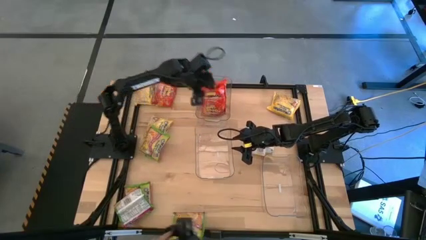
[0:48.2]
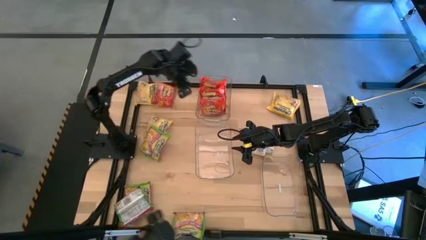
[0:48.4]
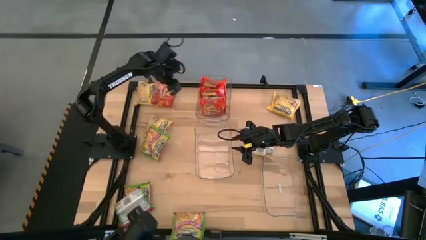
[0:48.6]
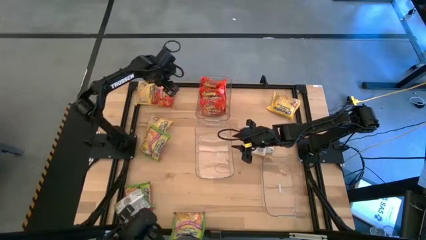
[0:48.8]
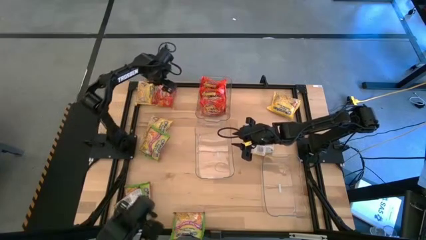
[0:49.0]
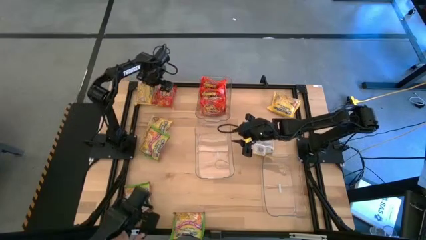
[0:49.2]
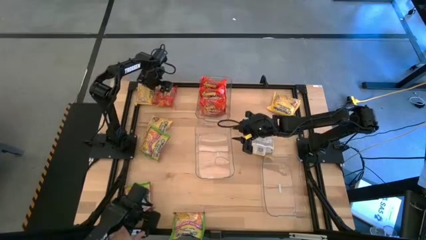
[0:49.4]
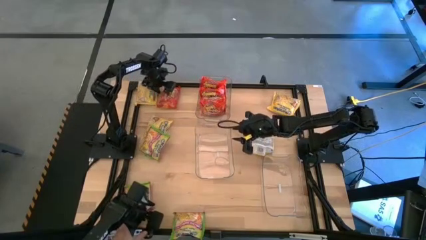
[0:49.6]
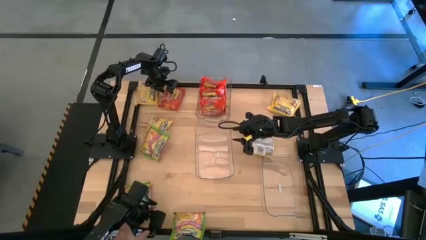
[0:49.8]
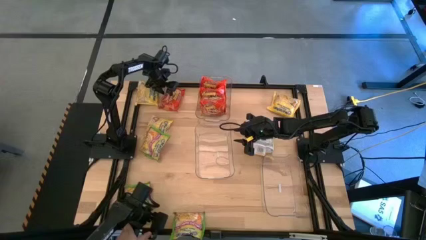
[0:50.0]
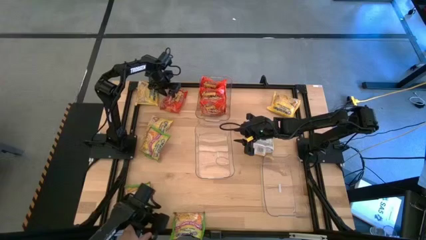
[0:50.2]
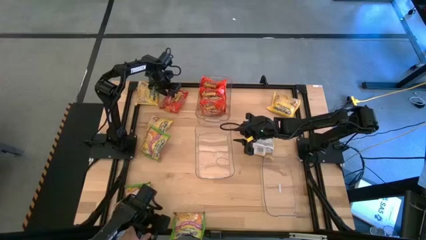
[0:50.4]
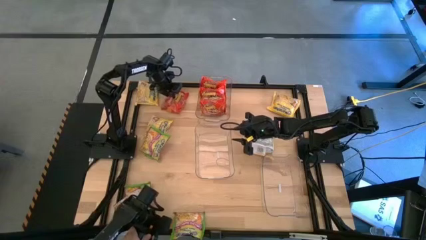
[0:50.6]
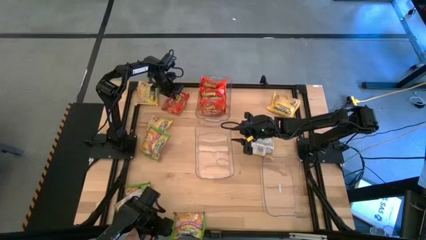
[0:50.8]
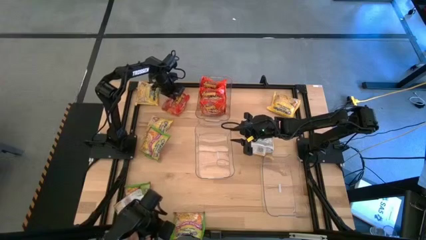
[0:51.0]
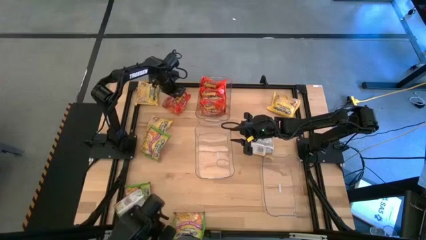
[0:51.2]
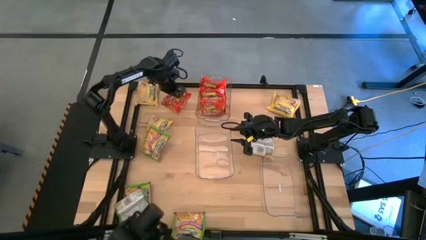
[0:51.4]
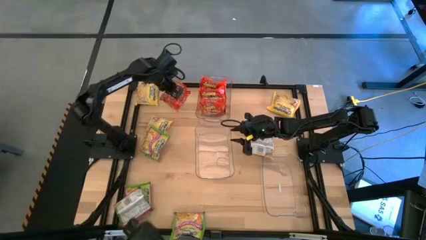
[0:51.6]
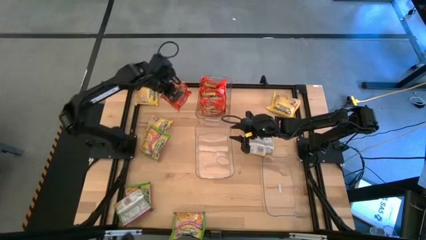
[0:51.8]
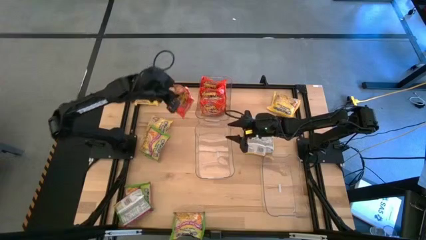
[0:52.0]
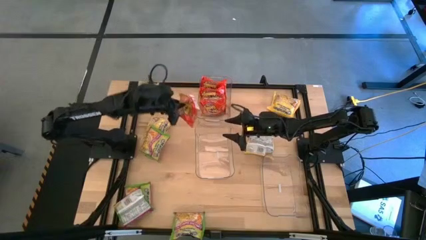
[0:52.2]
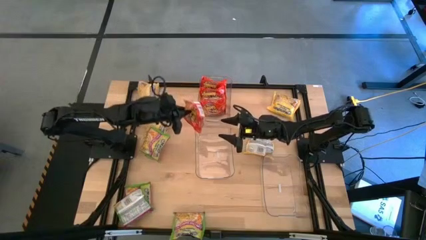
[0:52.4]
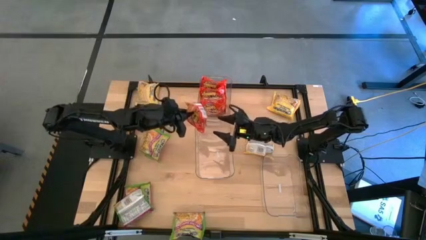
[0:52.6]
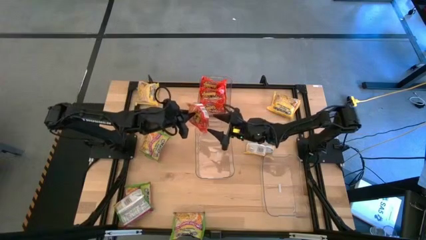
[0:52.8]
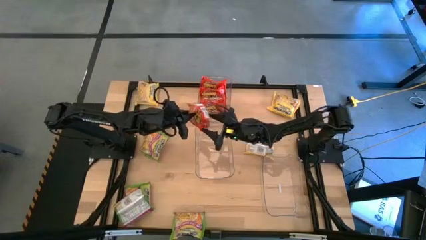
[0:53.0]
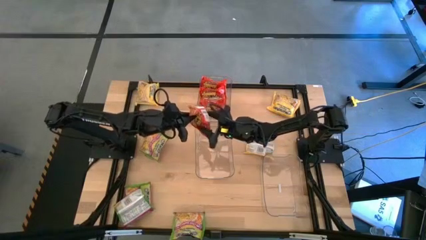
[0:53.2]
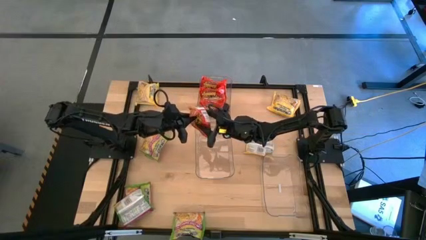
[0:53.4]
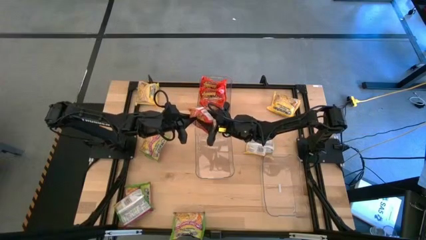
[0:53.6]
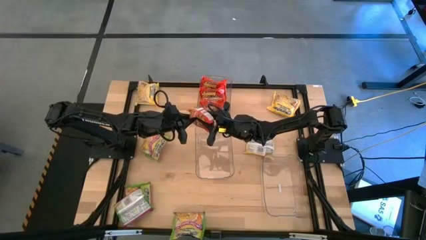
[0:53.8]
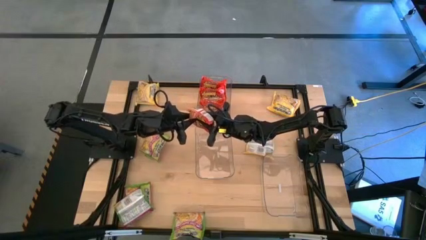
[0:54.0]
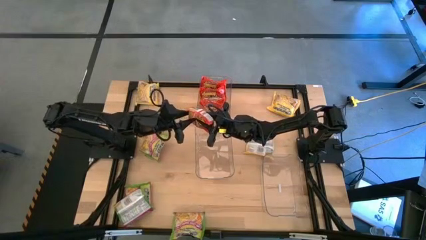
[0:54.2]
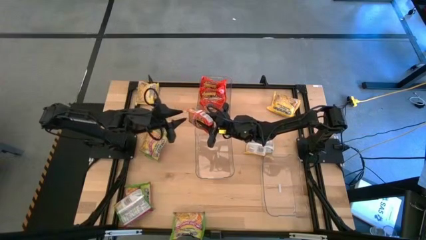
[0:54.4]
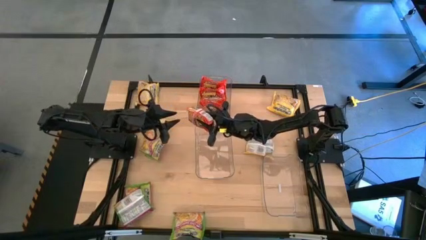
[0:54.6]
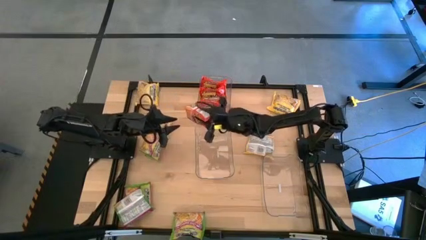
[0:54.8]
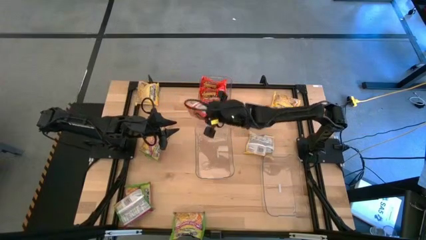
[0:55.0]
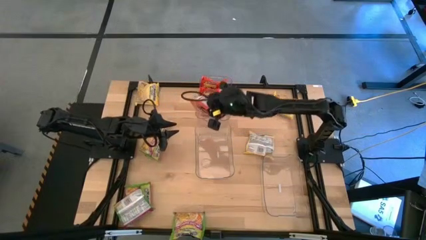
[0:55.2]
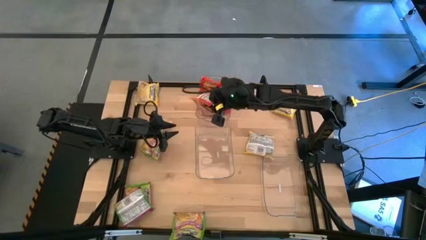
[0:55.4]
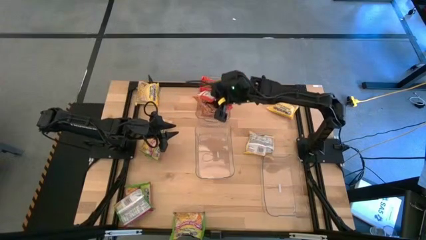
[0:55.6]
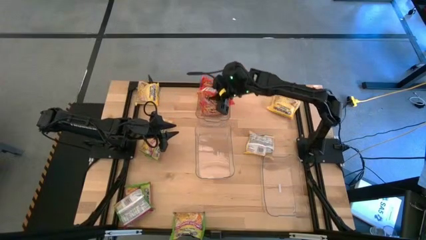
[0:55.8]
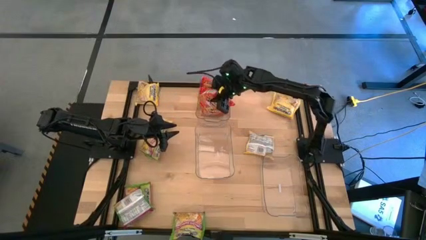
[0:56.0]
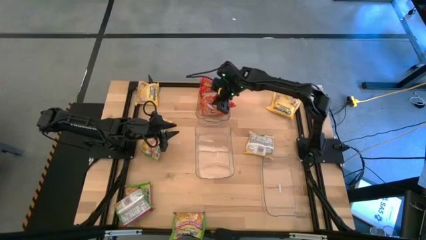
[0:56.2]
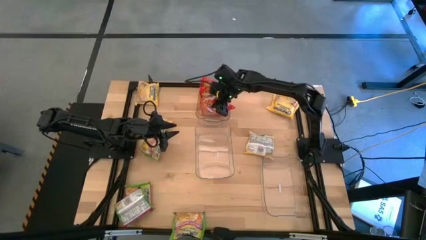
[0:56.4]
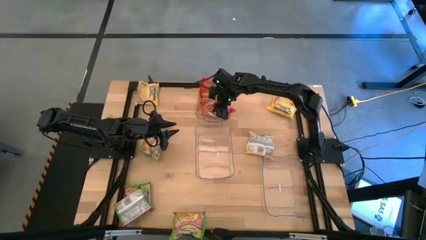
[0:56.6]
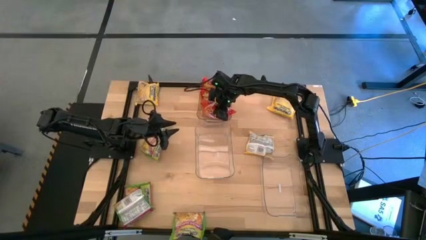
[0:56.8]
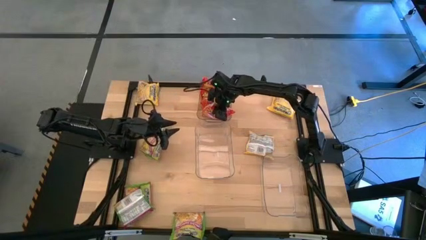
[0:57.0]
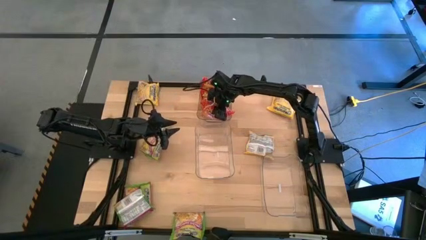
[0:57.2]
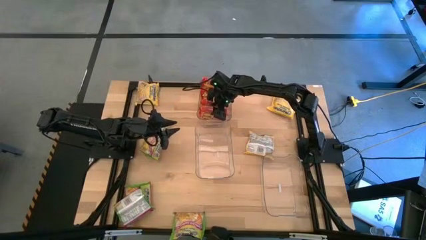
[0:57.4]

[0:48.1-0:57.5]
Task: Sort Maruchan noodles
Put the orange noodle pack into the top transparent bin

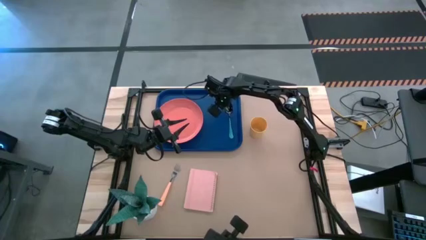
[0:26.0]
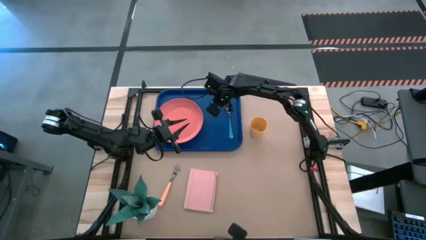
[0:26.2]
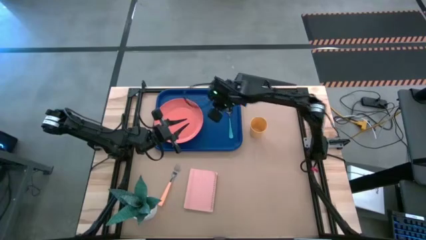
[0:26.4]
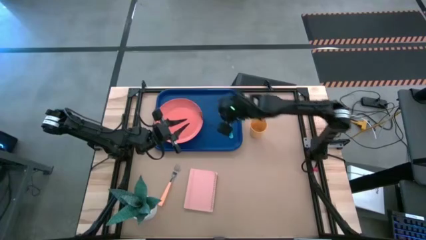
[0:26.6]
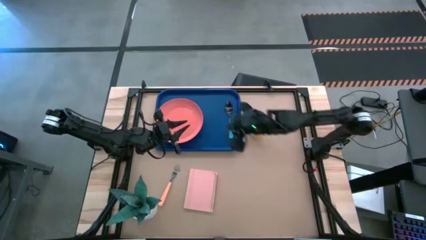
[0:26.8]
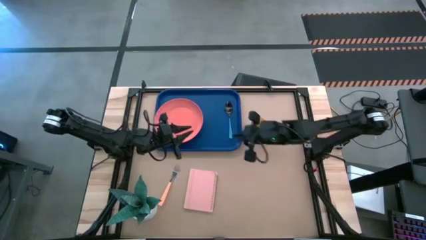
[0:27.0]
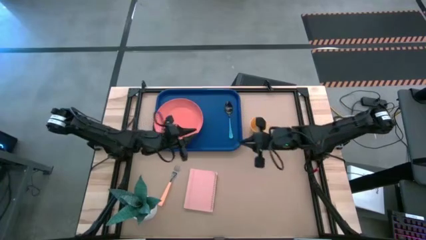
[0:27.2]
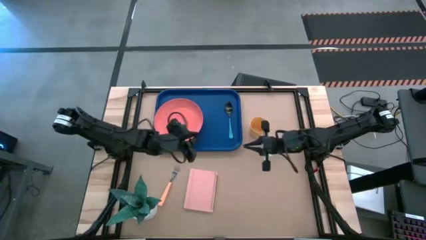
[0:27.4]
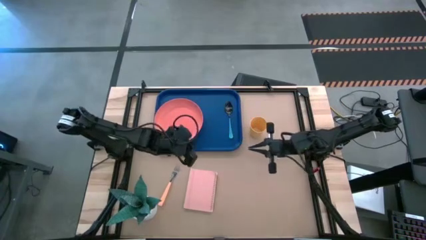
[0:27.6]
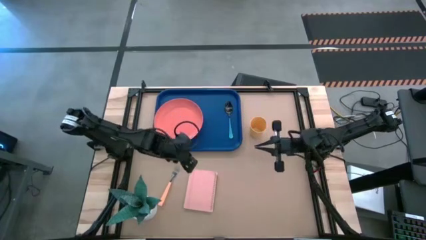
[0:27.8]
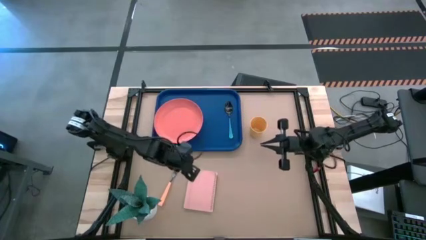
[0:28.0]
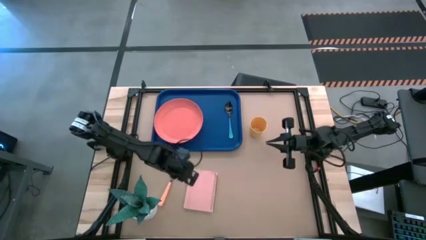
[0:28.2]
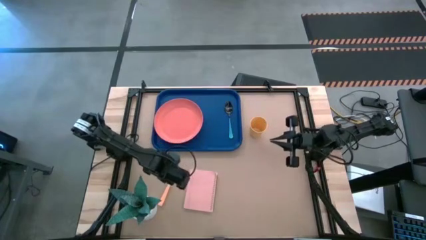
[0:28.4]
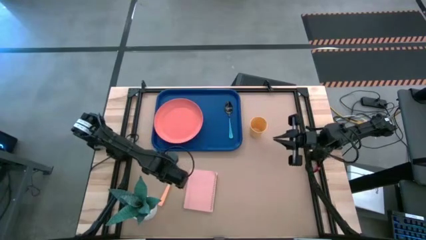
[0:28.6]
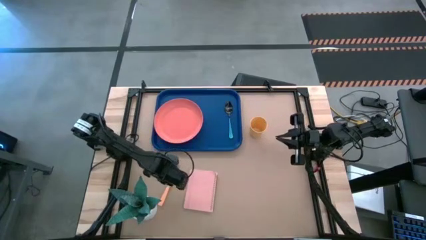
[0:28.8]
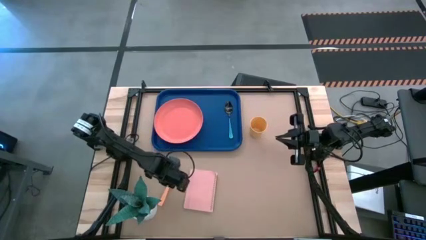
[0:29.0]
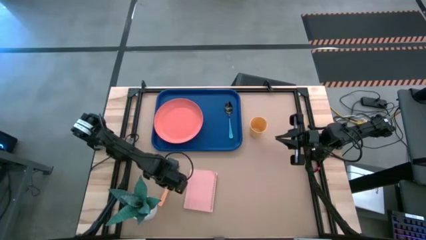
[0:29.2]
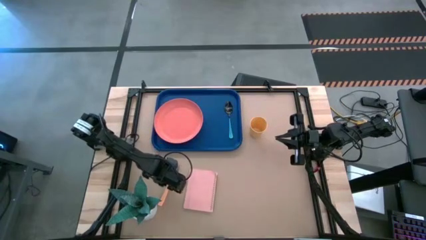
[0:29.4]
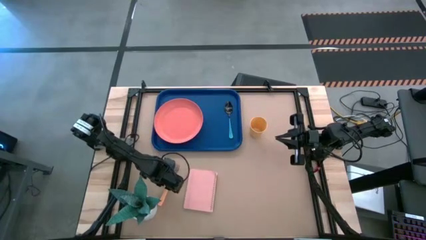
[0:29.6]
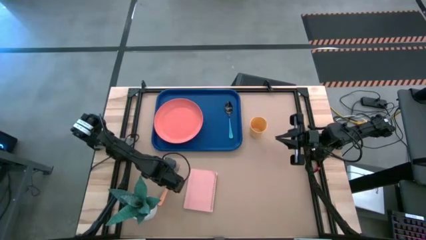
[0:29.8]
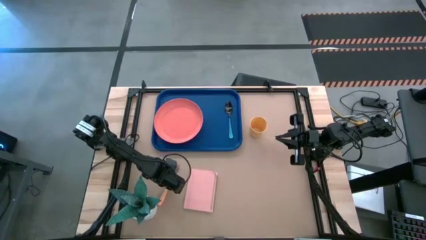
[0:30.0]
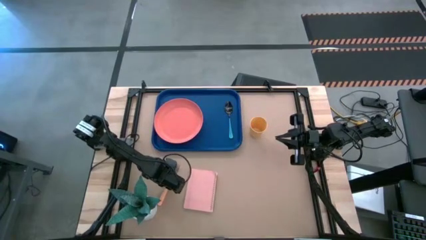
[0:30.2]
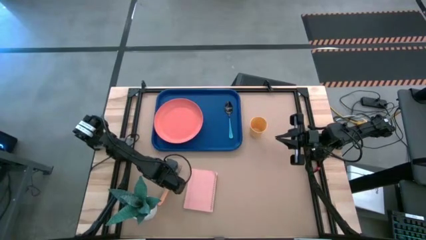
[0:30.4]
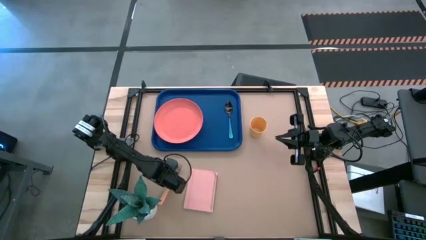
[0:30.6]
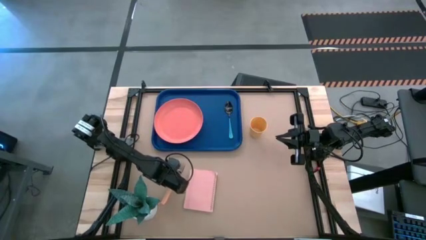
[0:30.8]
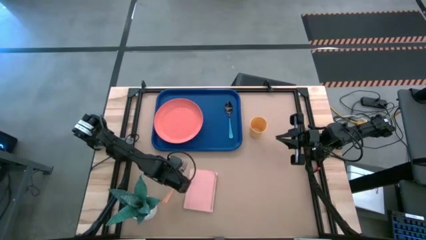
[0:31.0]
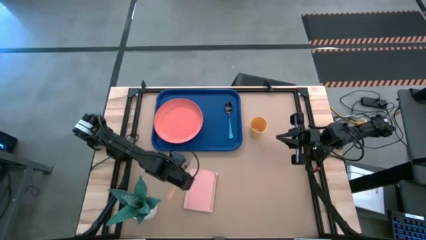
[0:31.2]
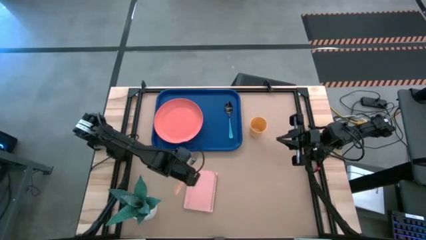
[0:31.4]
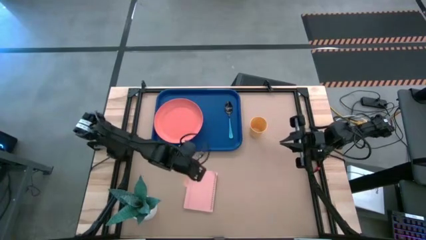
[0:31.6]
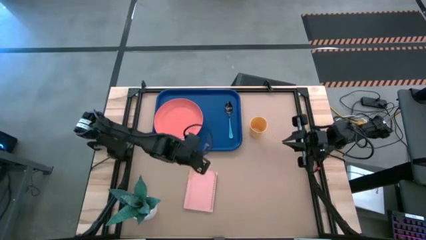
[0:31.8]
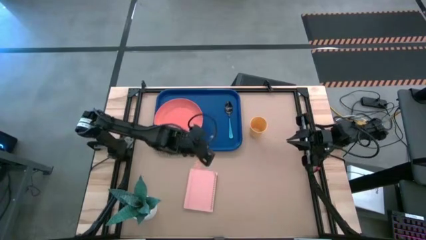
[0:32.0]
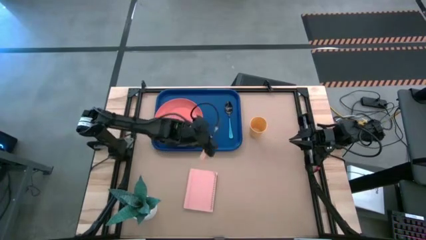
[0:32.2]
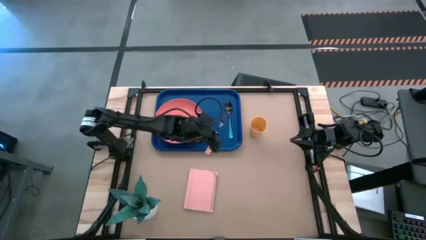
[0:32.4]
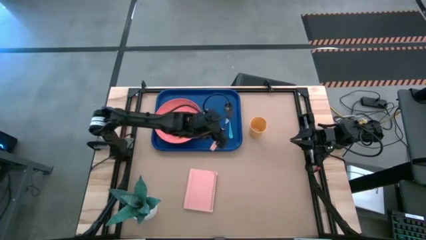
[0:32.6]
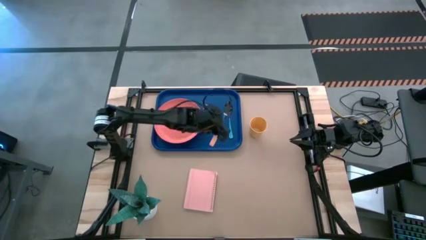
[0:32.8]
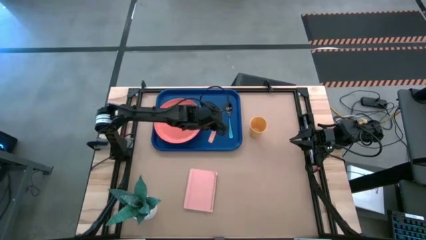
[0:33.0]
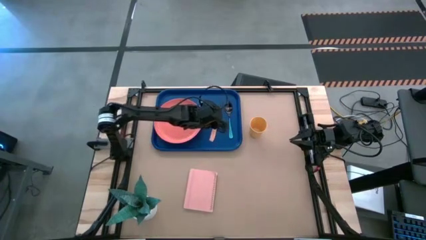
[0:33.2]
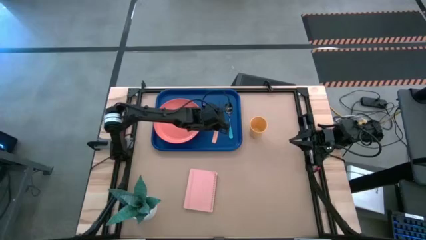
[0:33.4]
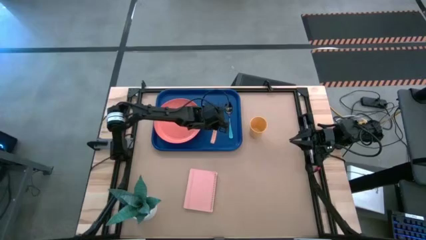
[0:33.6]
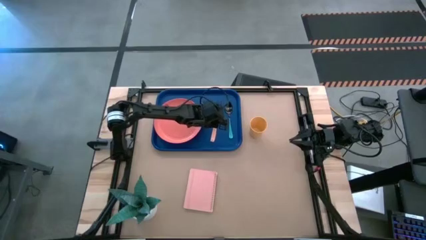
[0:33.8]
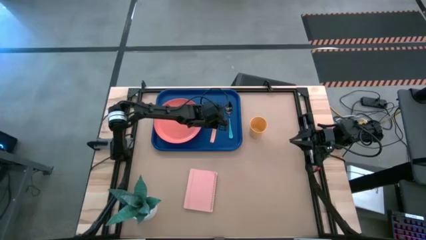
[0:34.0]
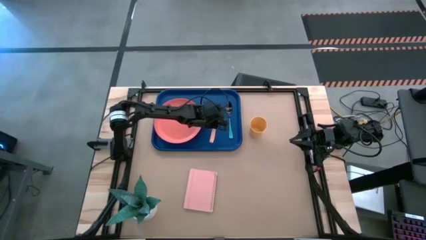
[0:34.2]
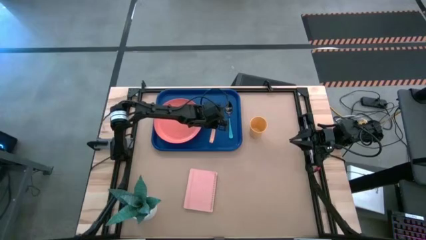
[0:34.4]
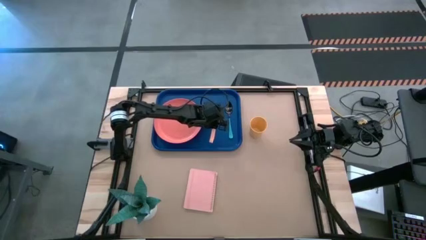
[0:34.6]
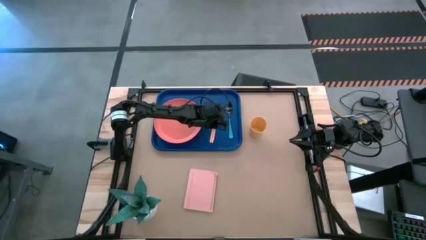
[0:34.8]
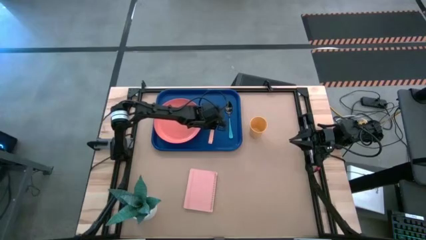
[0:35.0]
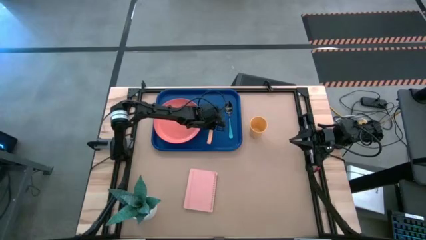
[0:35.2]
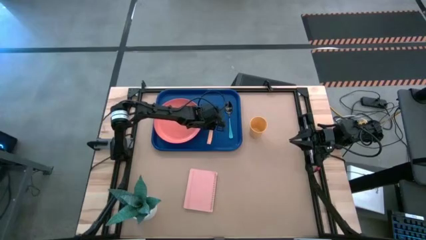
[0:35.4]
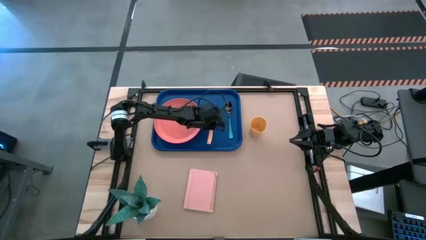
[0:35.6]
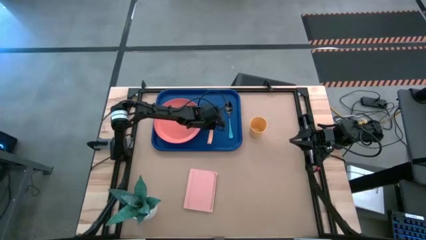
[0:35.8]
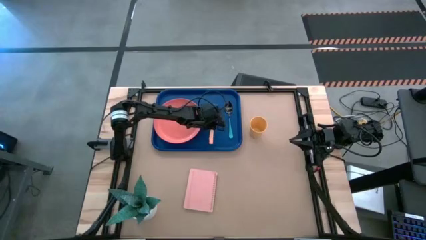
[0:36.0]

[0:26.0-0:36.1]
Task: Pick and place plate/cup/fork/spoon on tray
Put the light orange fork in between the pink plate and light blue spoon on the blue tray
